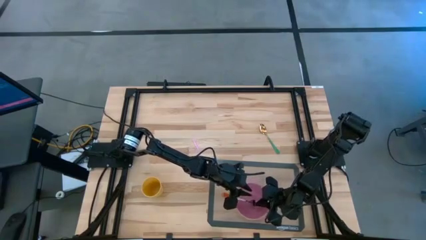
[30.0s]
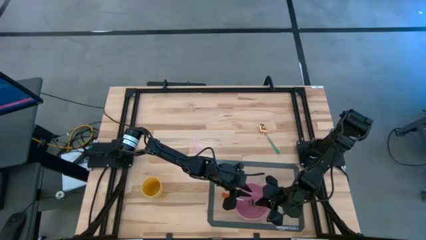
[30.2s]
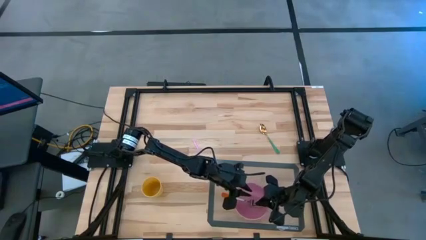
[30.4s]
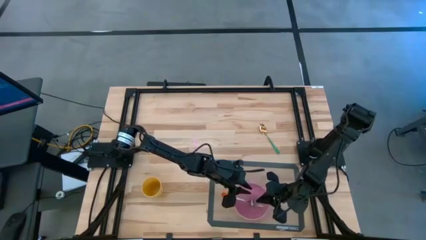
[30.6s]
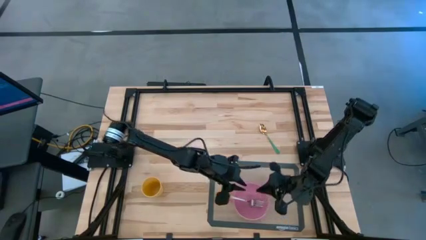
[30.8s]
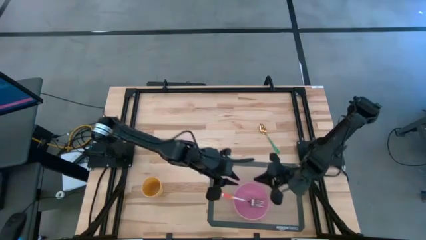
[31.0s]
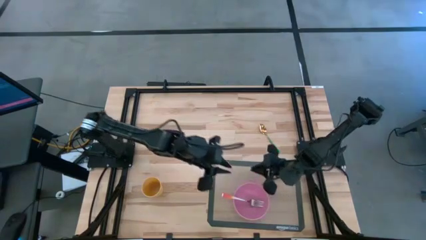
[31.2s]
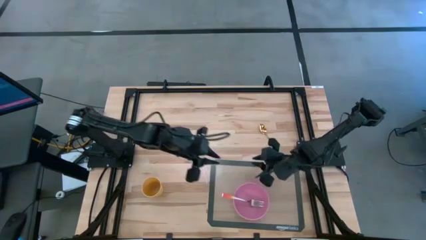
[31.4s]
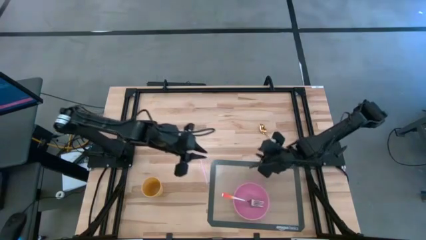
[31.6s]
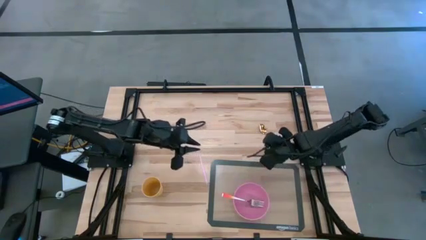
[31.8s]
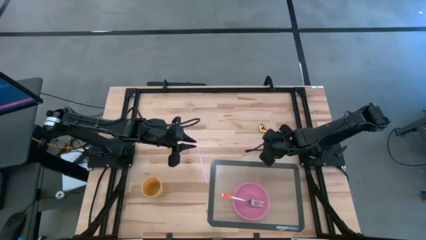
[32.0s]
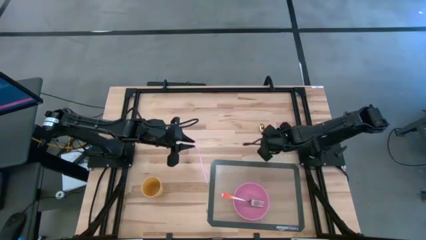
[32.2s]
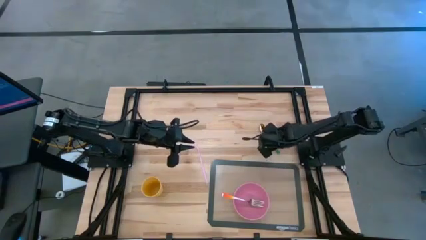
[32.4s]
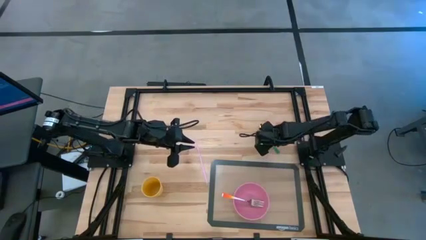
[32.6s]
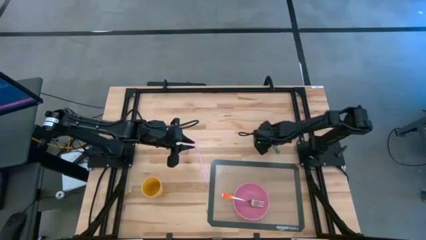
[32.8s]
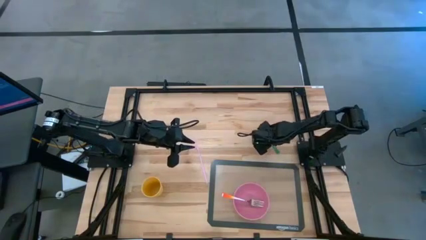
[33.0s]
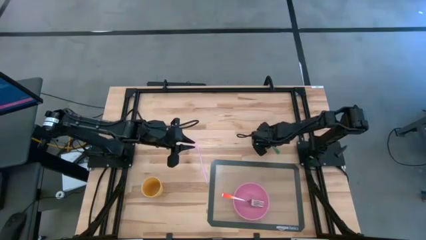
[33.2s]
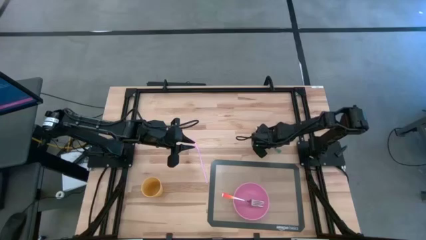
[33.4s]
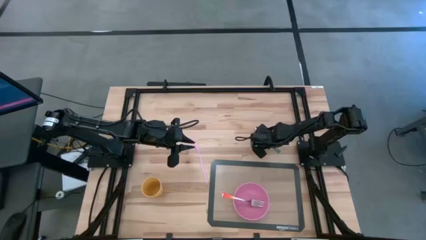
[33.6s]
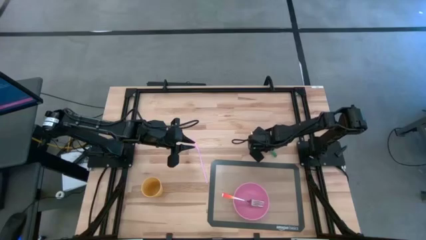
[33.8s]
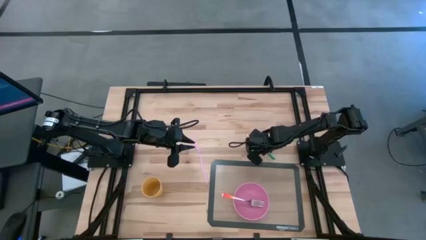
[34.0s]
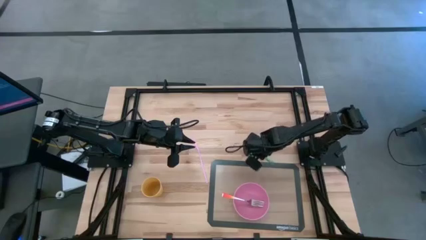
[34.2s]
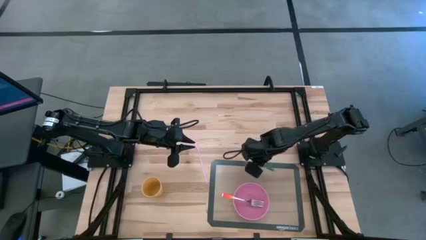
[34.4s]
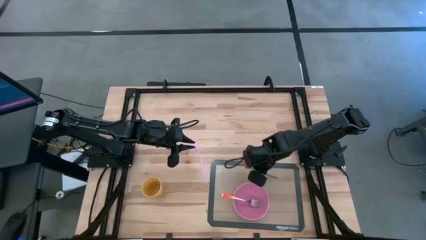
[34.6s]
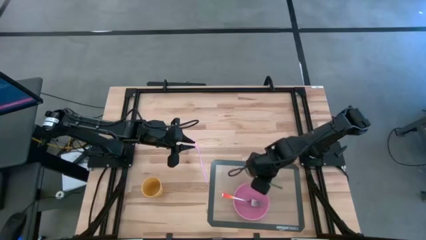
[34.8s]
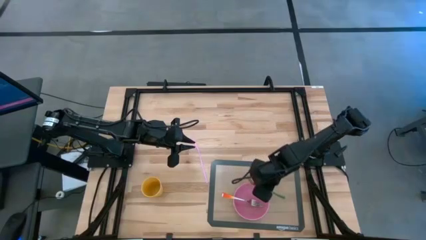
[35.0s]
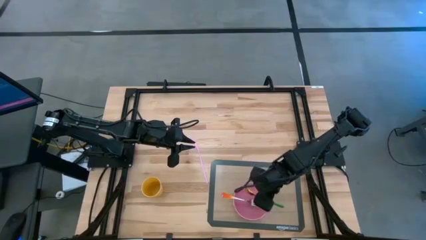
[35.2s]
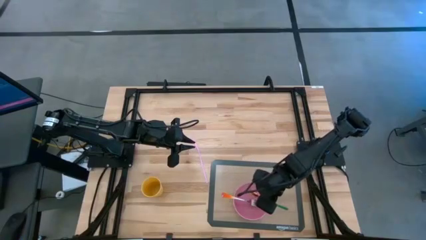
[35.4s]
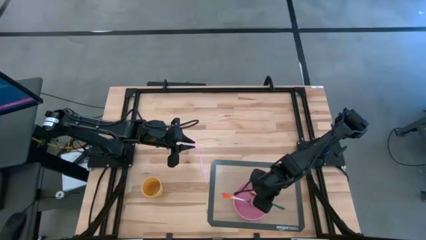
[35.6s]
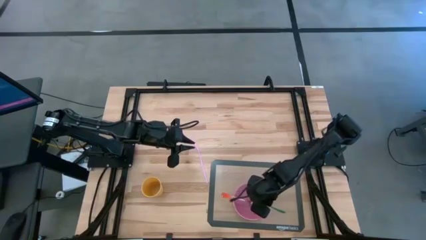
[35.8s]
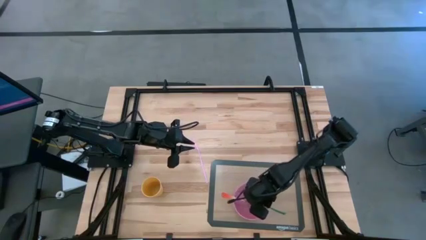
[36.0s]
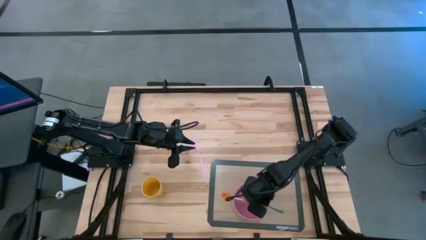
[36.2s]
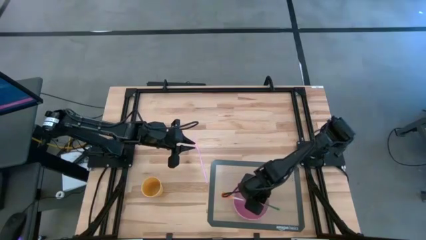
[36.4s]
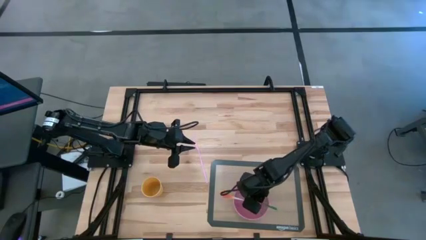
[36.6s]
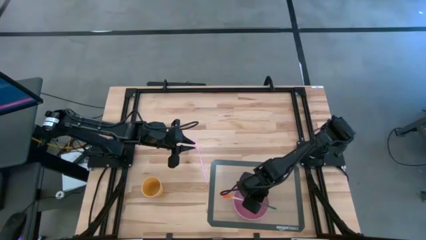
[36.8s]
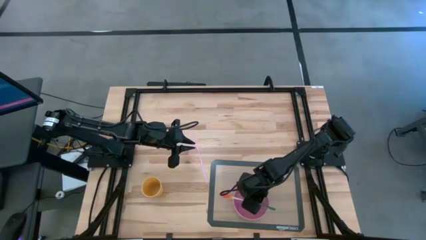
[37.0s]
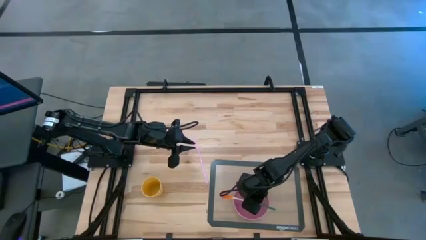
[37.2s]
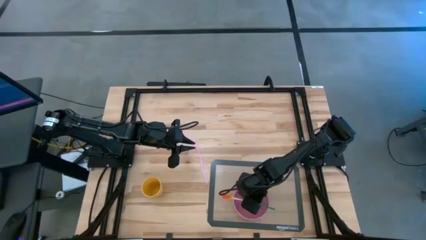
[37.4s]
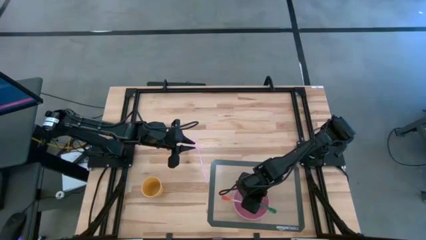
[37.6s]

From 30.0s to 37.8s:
Task: Pick & Place Utensil
Put the spoon in the pink bowl

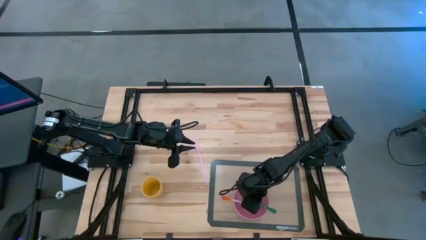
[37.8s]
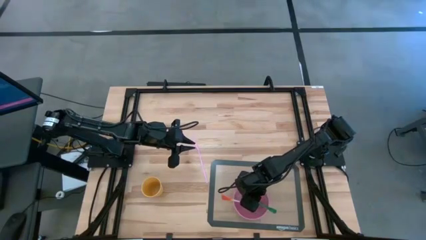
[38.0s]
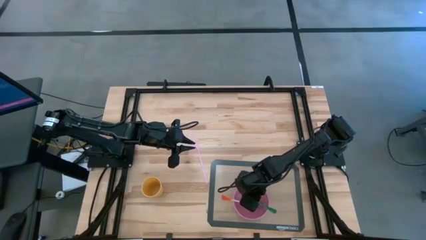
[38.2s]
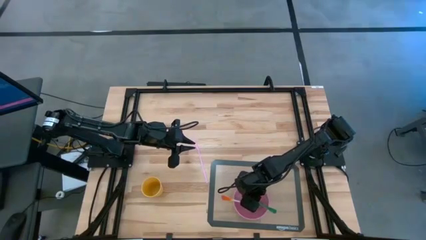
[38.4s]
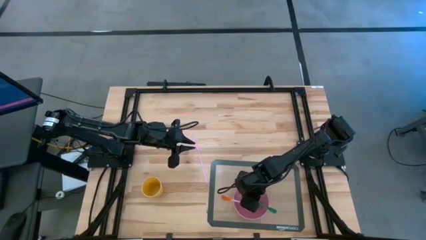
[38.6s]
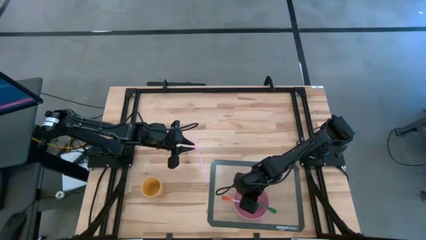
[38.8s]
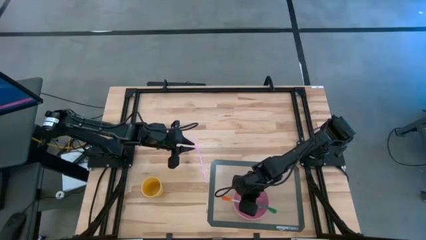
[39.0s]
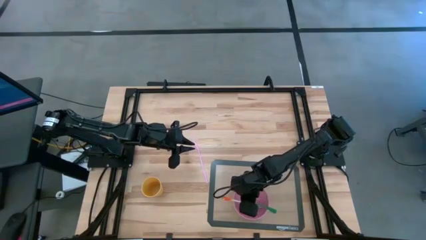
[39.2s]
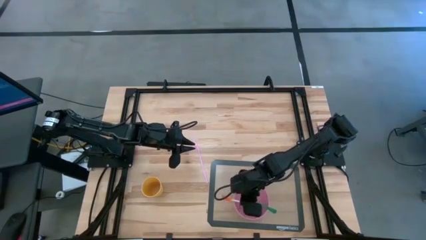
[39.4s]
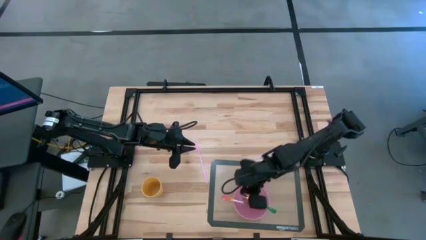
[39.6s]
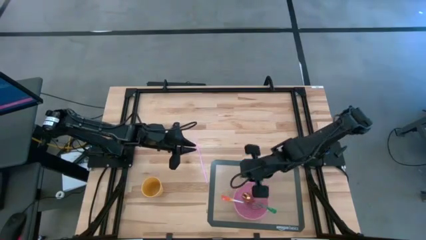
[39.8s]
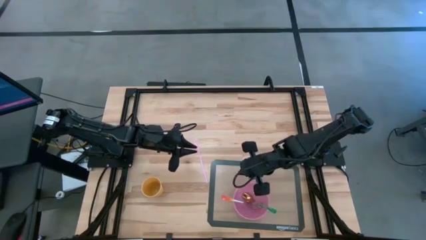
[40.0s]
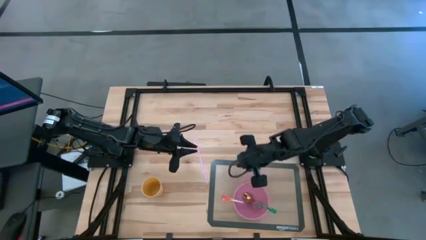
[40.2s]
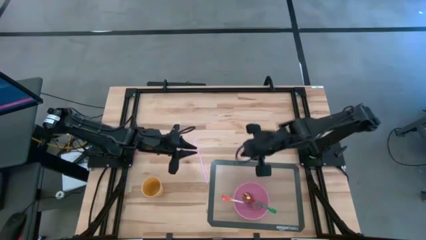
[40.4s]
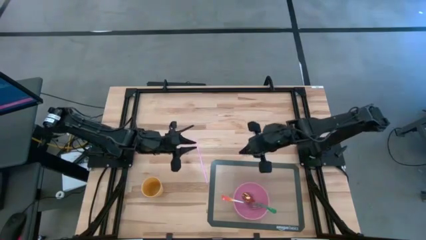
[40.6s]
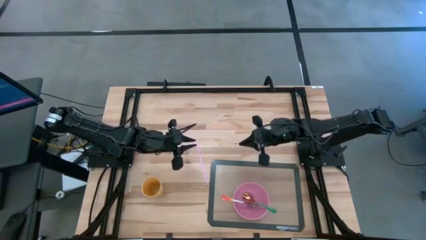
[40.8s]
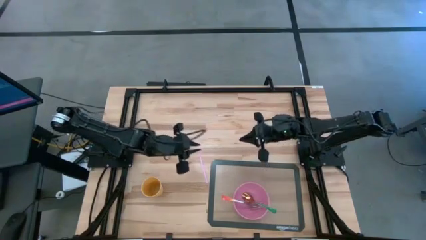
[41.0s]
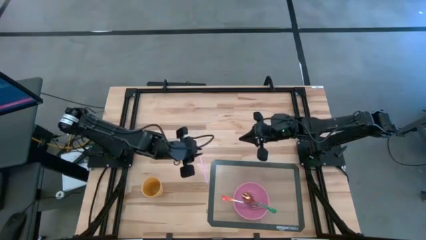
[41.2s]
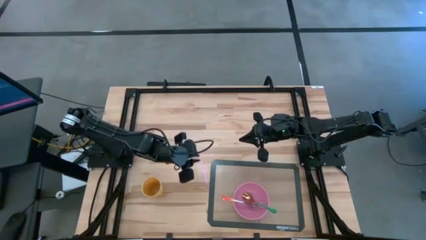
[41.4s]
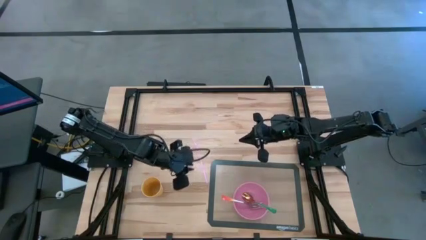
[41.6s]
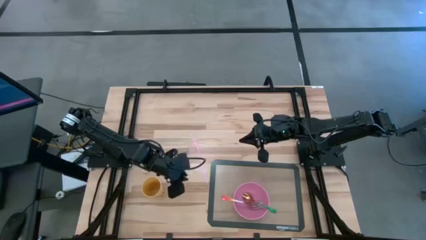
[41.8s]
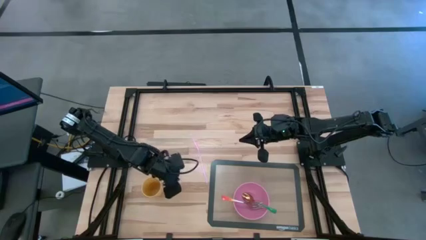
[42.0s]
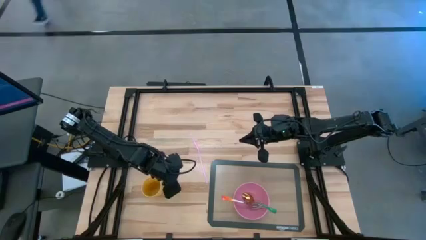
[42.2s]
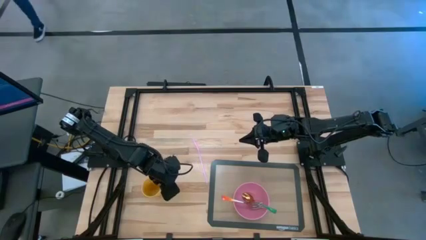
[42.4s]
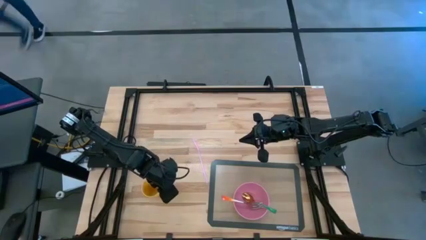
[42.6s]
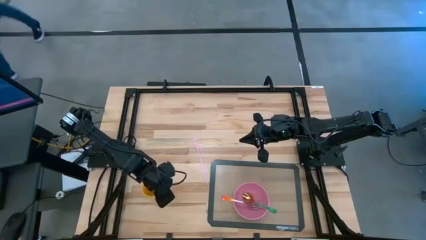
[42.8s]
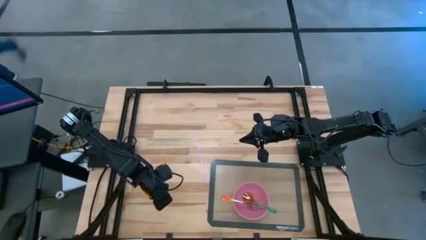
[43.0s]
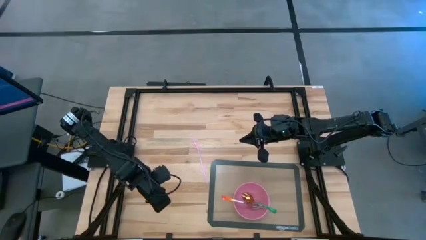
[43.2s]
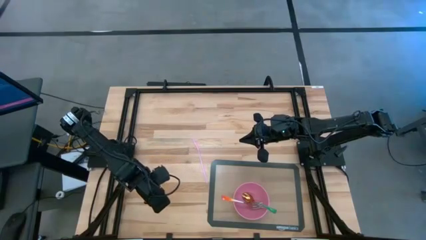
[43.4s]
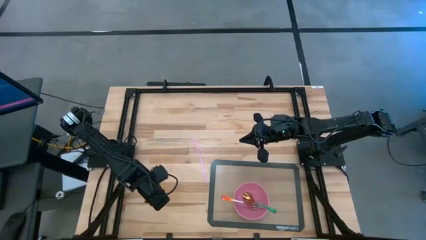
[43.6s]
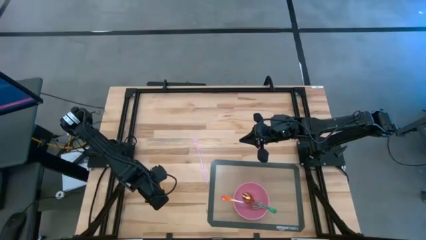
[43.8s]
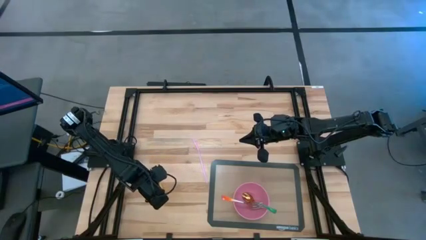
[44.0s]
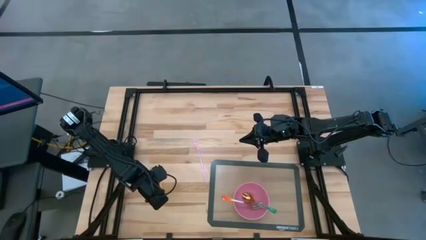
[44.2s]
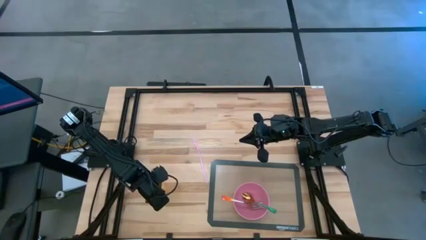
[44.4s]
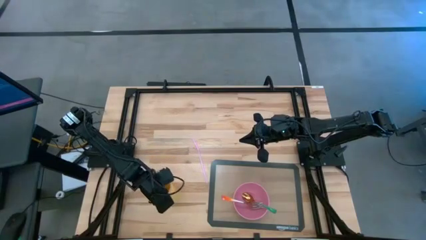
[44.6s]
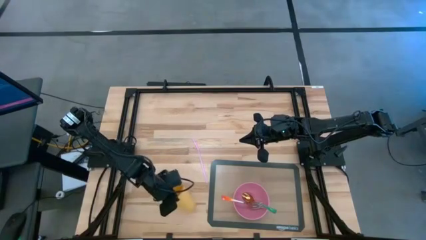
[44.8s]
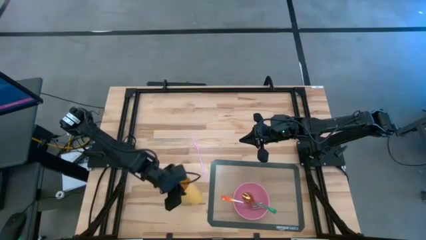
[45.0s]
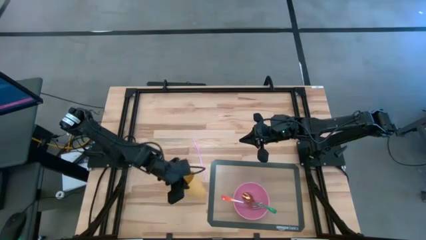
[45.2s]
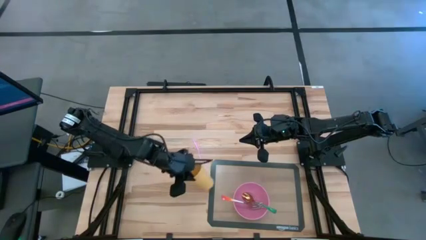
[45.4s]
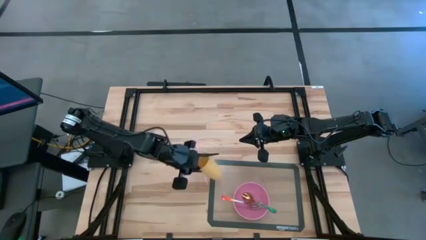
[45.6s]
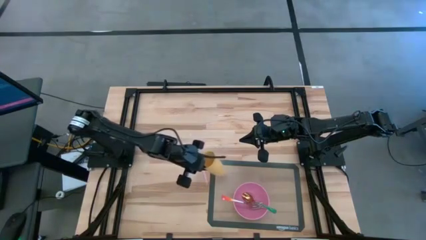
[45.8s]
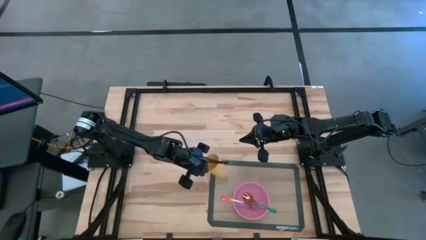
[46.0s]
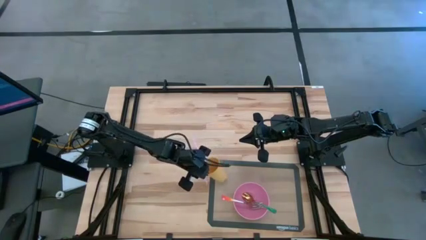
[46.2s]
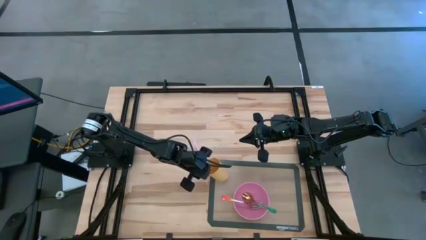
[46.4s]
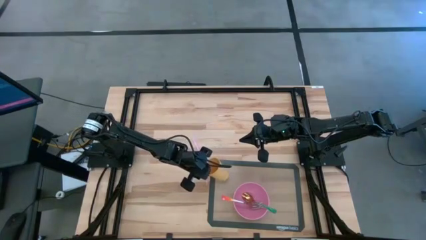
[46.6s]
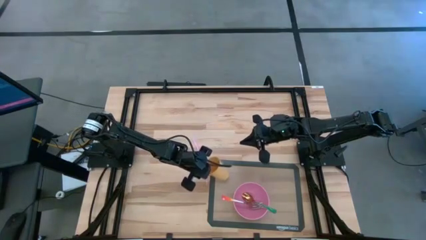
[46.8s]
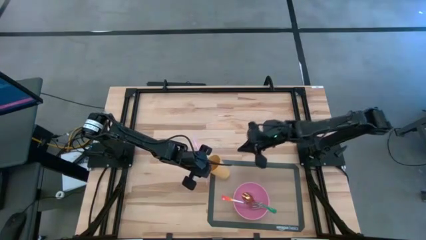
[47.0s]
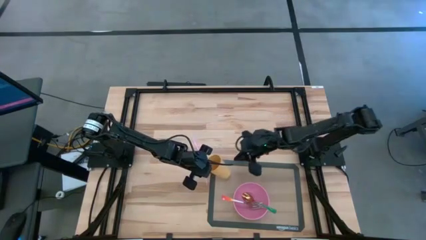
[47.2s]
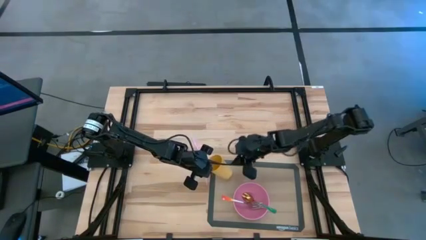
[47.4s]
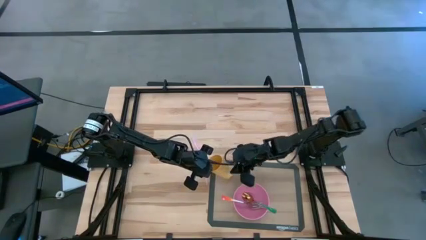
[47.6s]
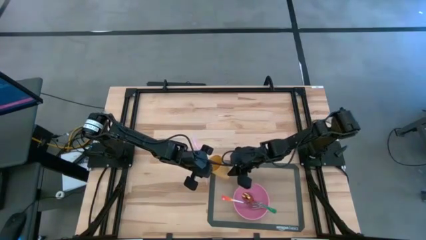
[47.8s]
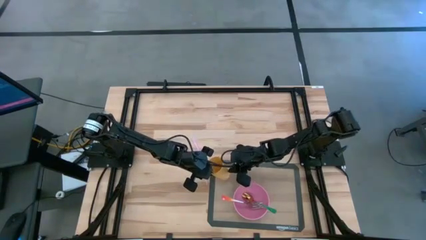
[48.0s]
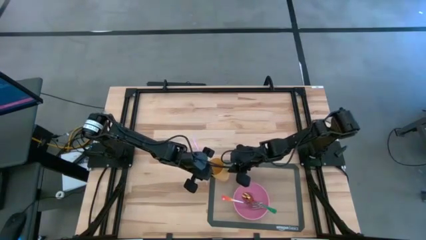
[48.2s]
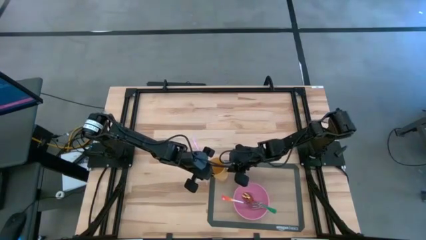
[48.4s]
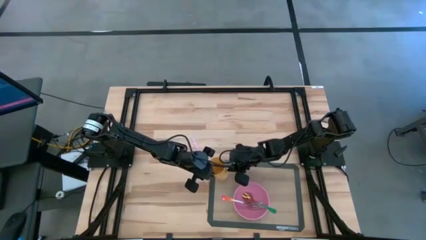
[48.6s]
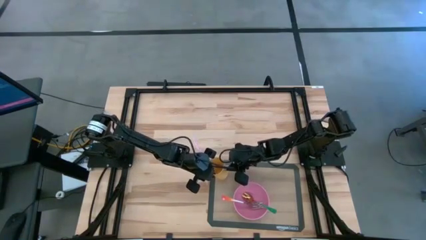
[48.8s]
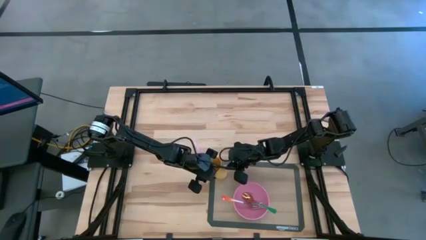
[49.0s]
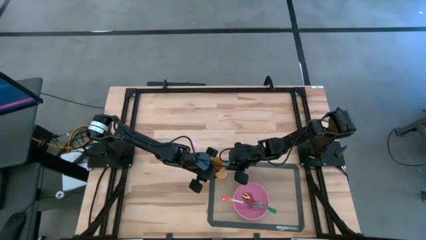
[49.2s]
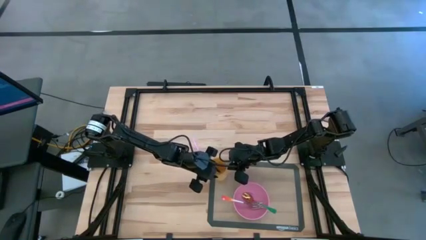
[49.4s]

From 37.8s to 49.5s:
Put the yellow cup on the top of the transparent placemat
